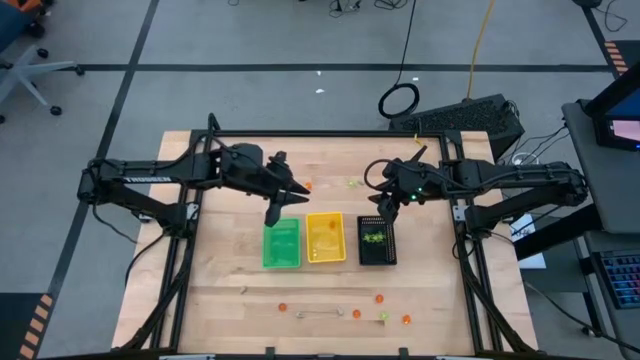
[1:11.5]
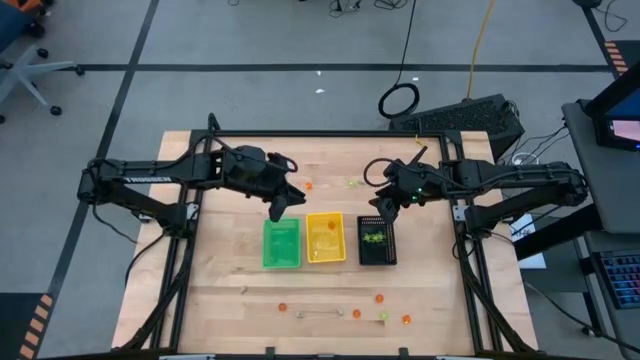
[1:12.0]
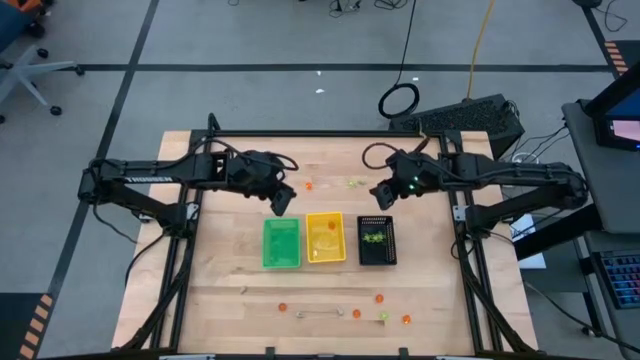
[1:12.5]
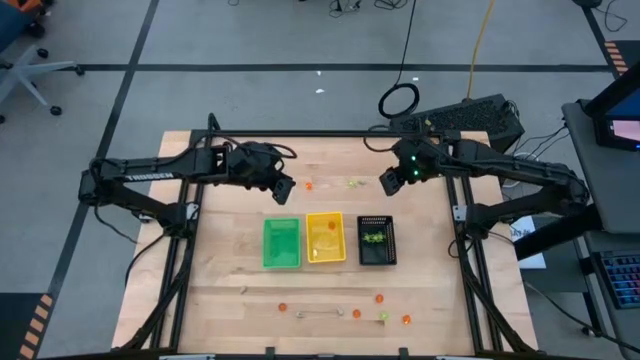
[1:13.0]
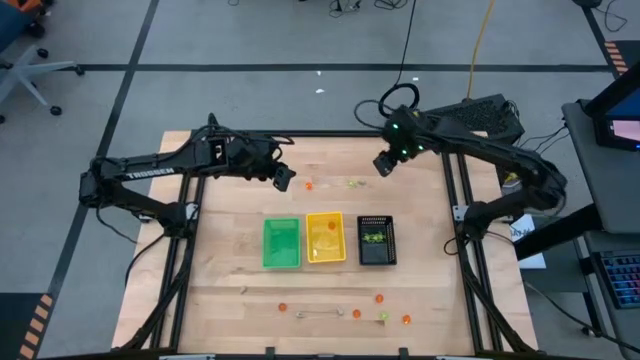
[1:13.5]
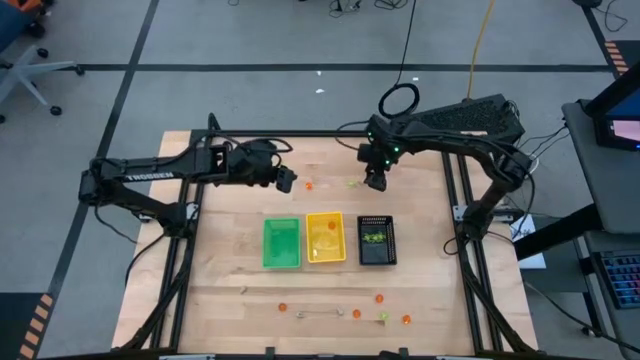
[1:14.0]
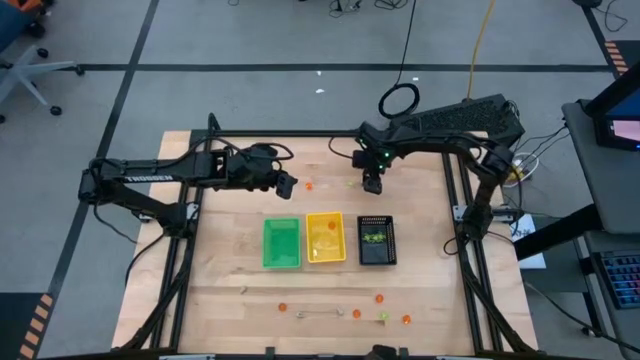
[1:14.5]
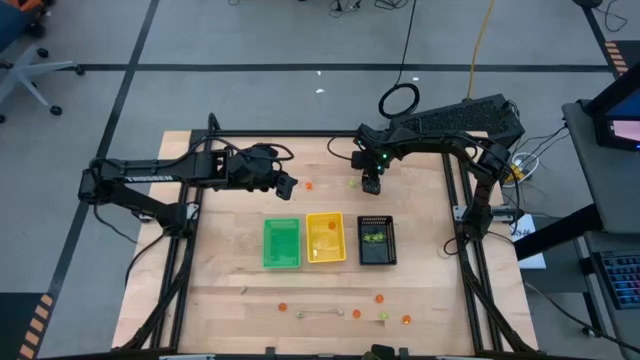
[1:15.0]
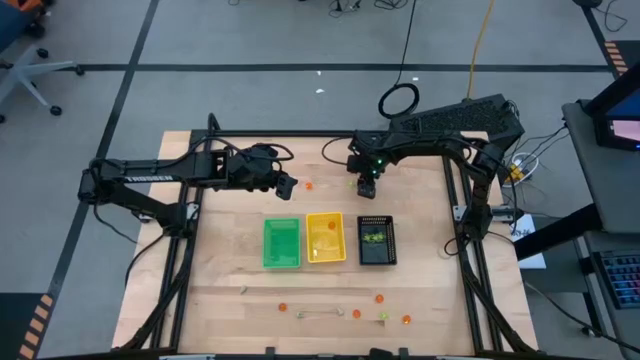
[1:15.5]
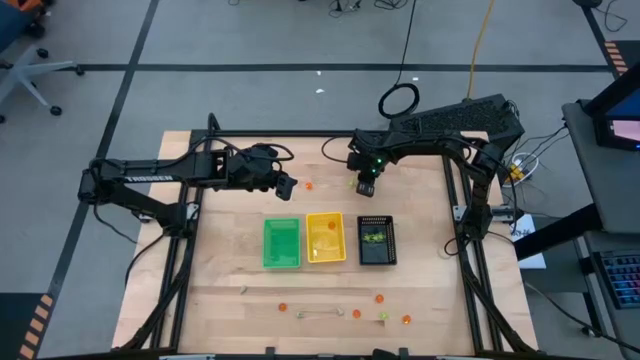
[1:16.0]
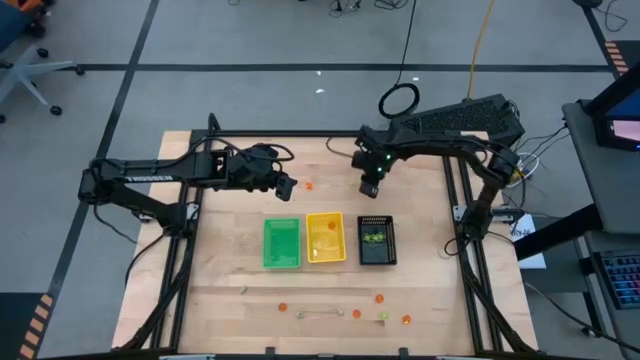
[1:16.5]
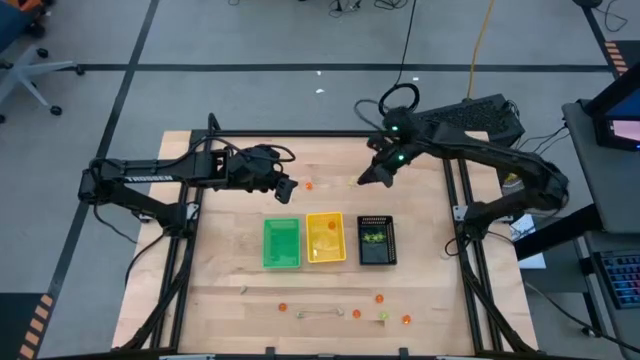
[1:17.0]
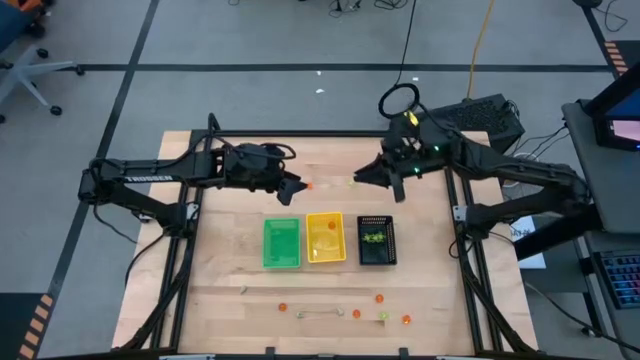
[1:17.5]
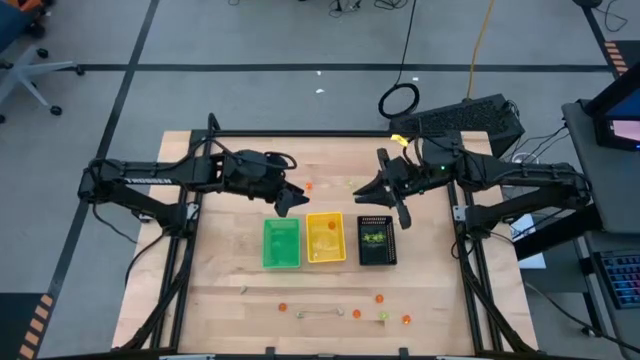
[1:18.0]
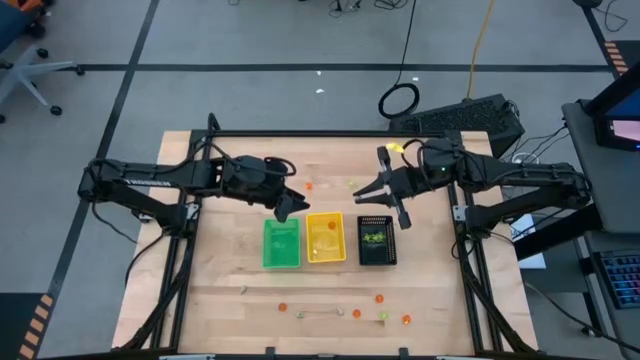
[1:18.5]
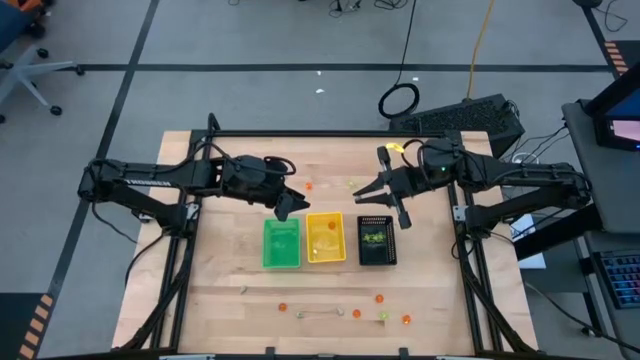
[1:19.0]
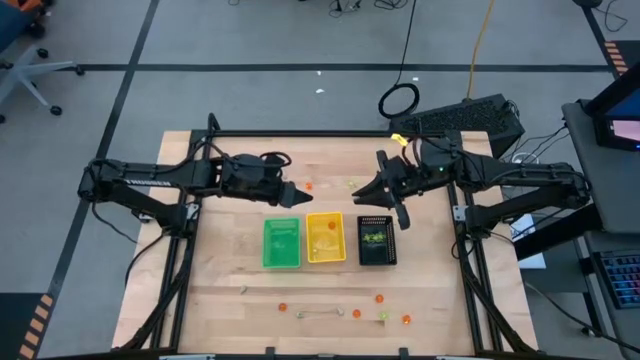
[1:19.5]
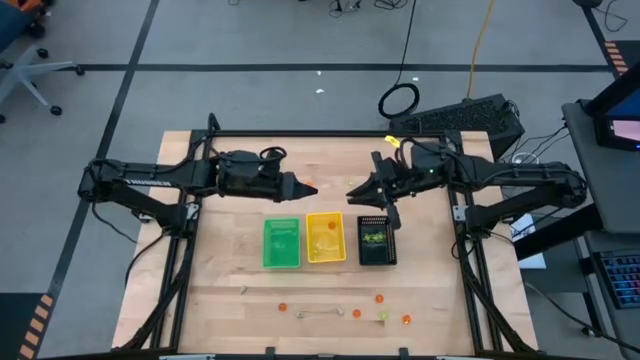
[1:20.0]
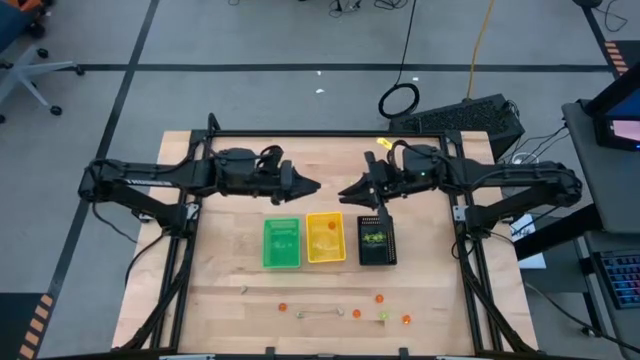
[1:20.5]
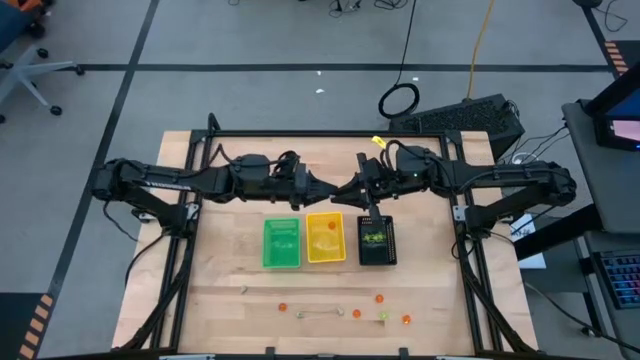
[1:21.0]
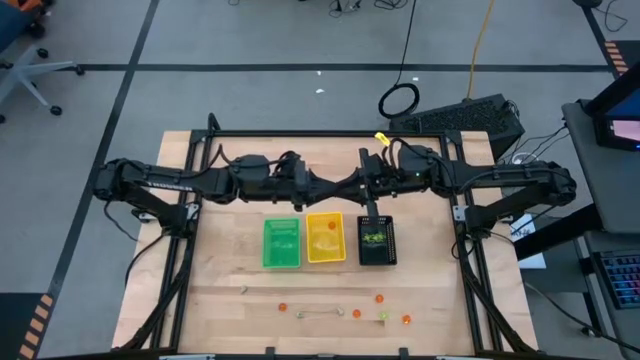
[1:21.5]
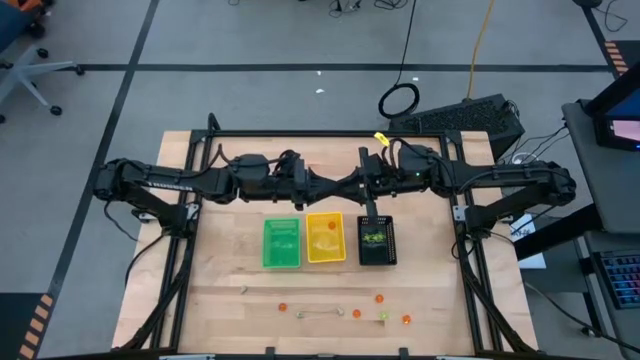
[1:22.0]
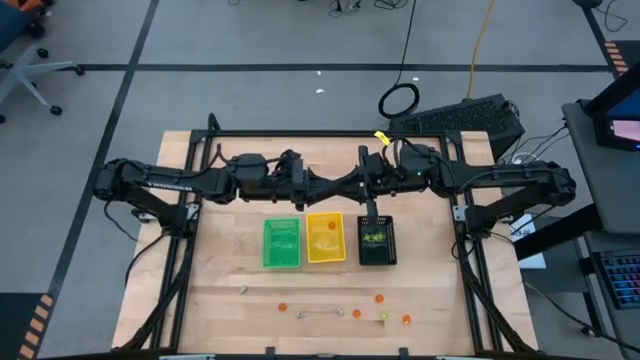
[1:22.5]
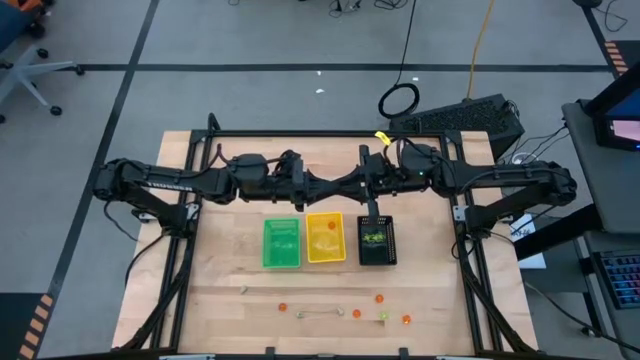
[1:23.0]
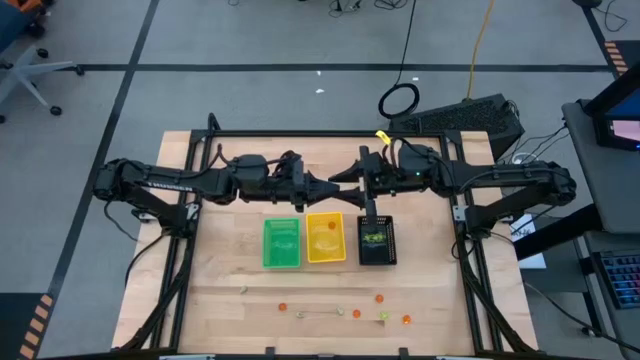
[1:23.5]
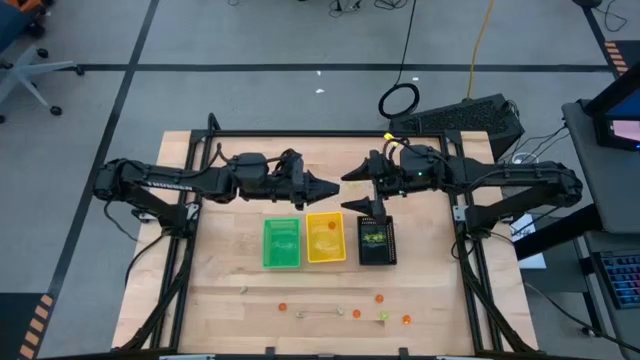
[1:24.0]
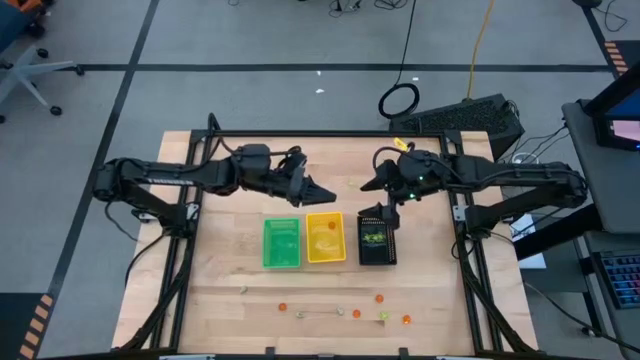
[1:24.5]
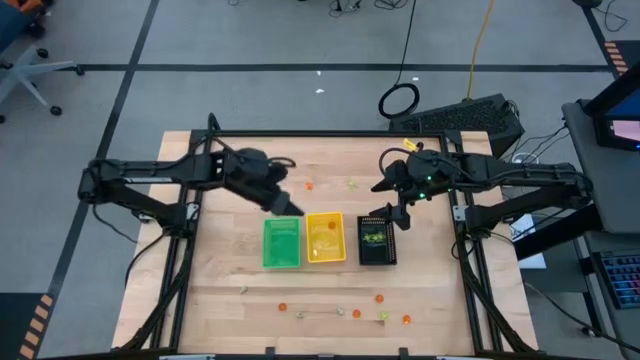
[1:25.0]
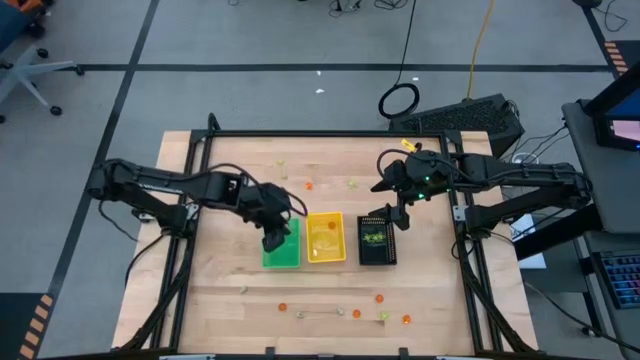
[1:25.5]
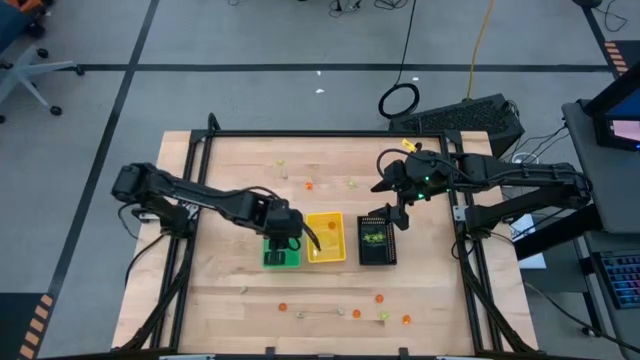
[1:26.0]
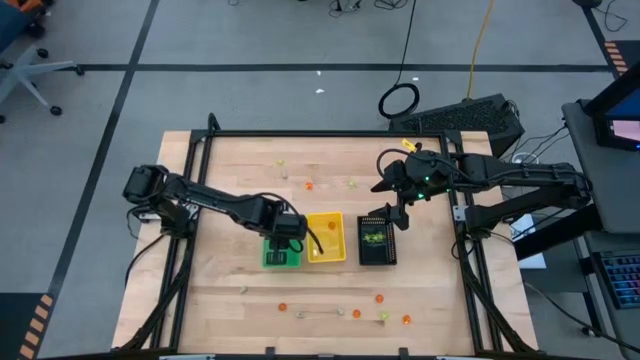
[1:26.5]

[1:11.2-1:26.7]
Task: Sort Halloween decoration
Put the white skull toy into the green basket
